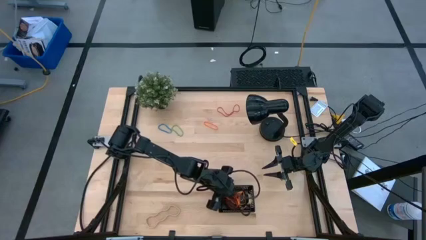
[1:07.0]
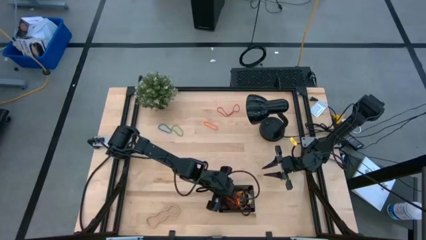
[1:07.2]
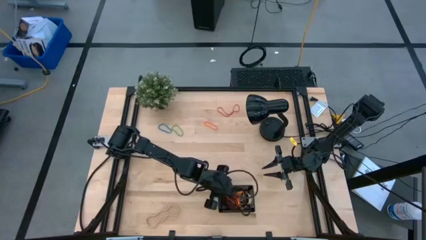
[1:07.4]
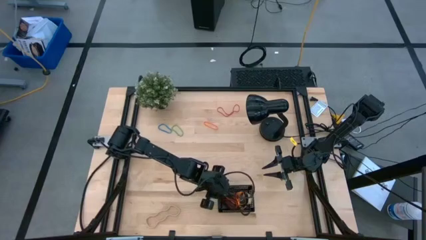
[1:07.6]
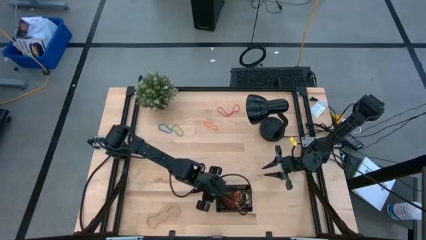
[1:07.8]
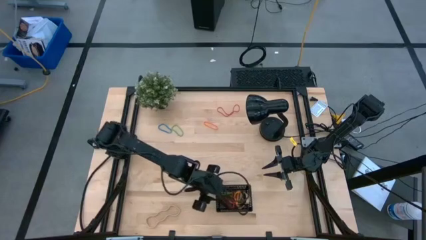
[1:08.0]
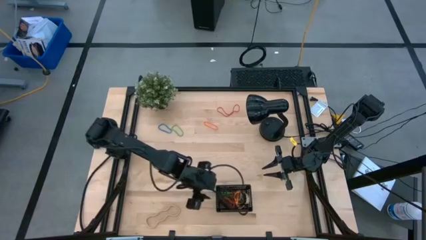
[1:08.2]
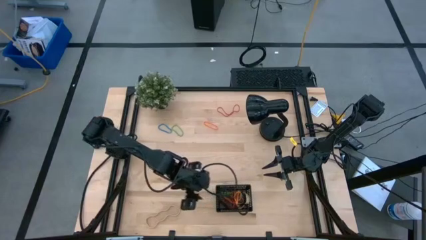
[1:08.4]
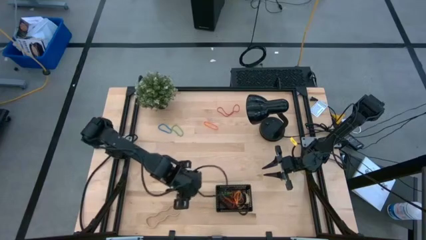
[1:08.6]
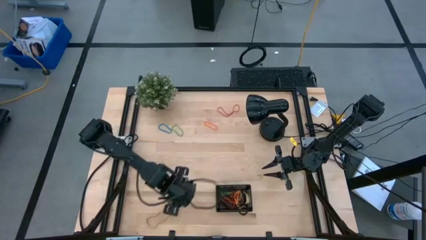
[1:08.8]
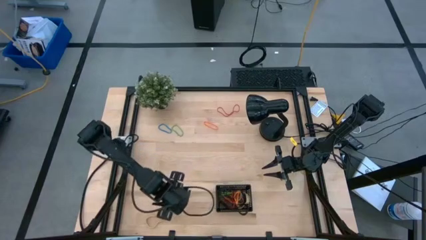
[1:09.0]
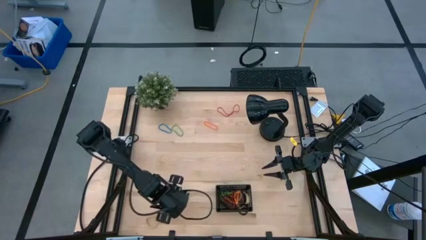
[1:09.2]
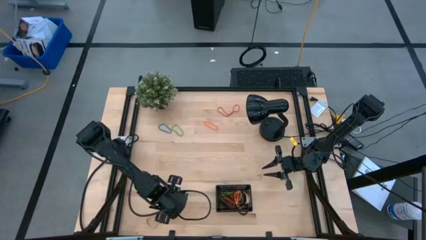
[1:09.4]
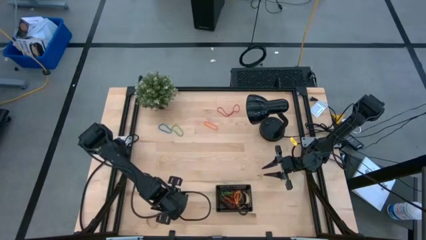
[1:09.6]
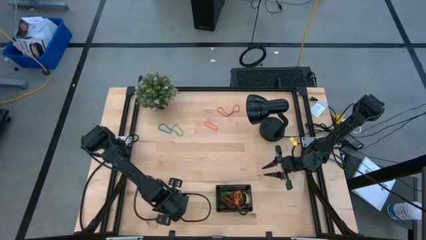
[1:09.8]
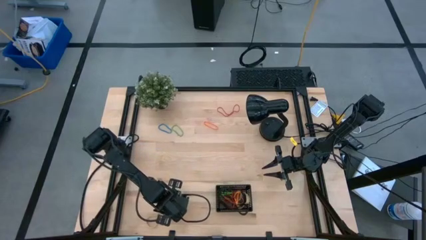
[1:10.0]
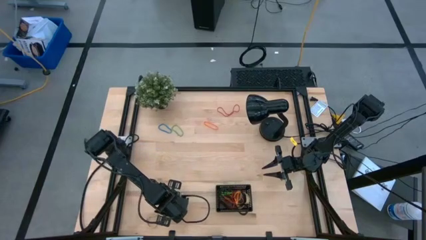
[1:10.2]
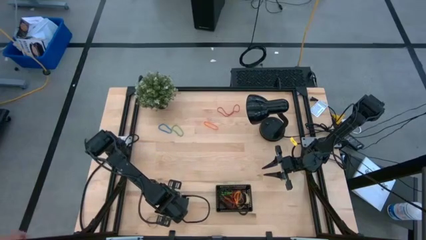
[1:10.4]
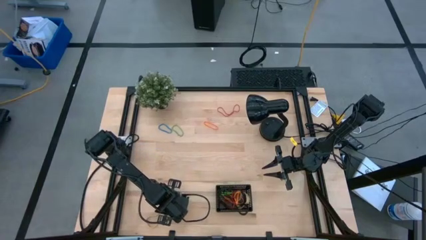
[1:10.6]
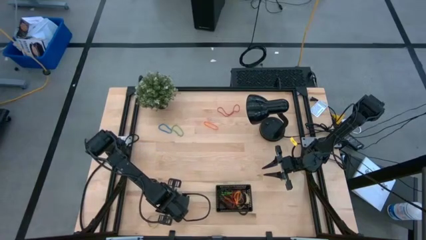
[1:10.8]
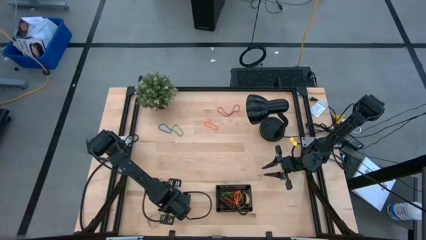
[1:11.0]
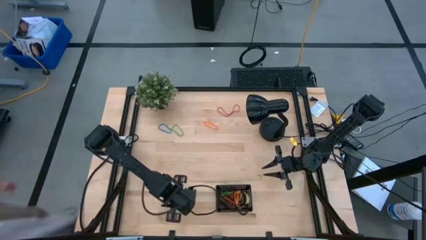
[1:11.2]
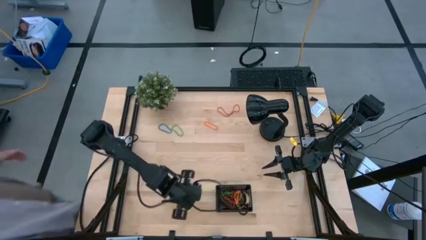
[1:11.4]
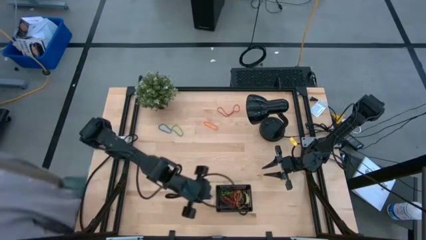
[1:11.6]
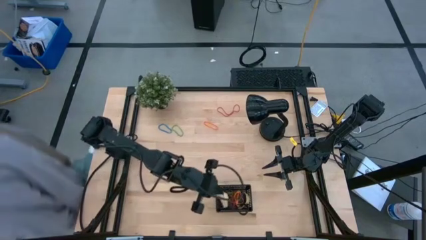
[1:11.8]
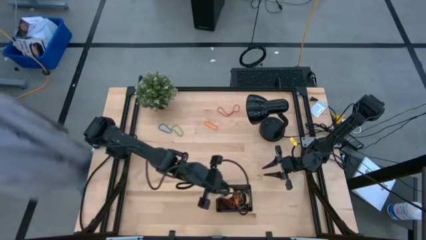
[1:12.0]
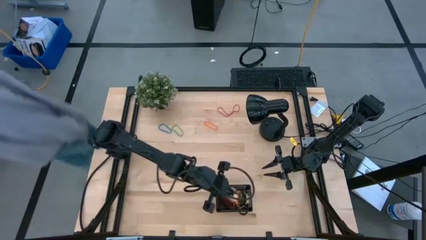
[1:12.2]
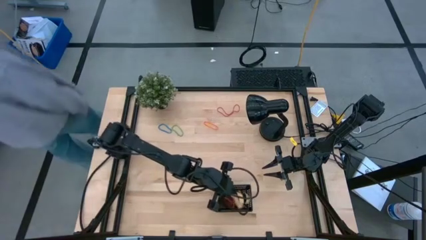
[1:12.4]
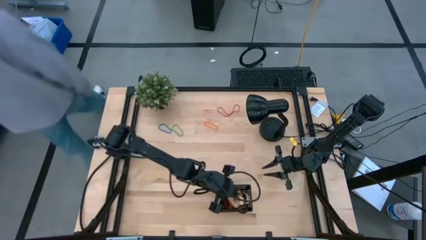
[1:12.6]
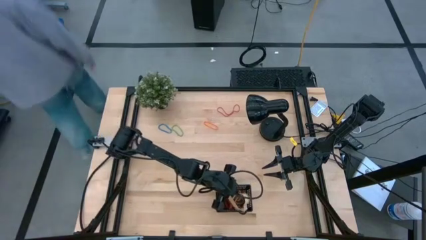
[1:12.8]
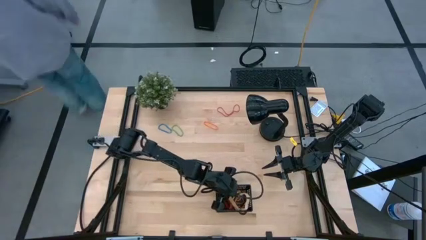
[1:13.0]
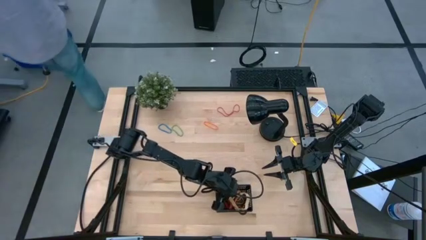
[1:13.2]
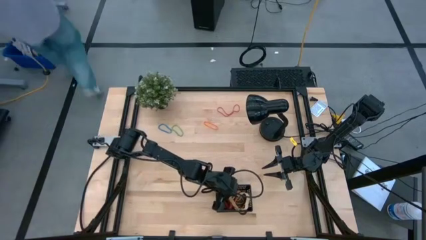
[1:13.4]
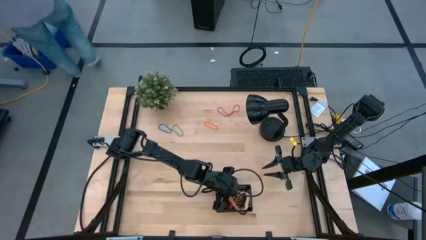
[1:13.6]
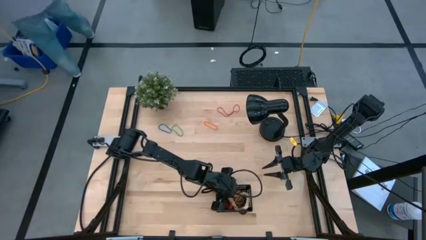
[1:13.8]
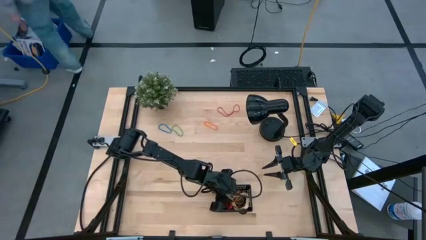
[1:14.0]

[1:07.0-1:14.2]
Task: Pick and place rubber bands into bin
Put the brown rubber band into the black bin

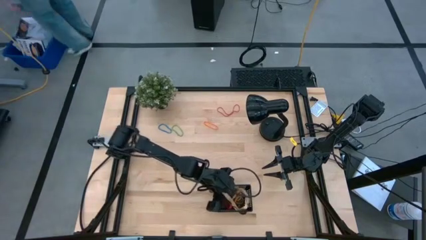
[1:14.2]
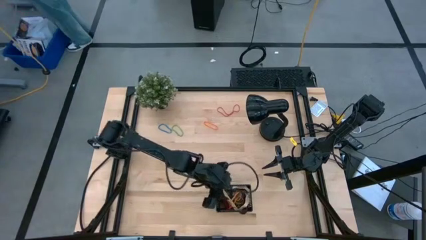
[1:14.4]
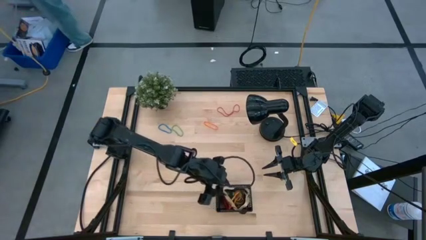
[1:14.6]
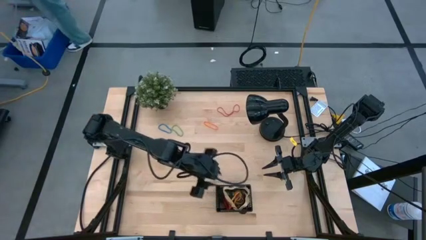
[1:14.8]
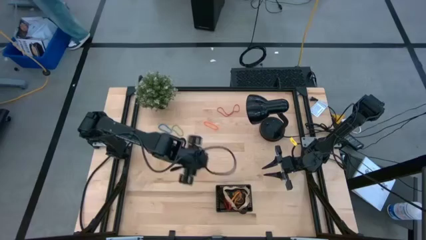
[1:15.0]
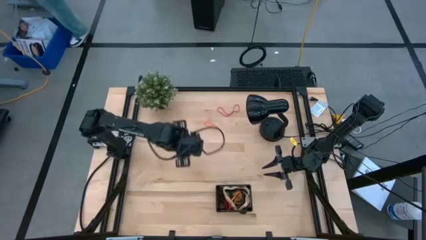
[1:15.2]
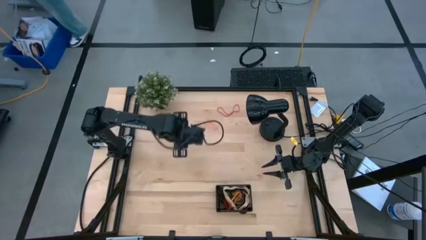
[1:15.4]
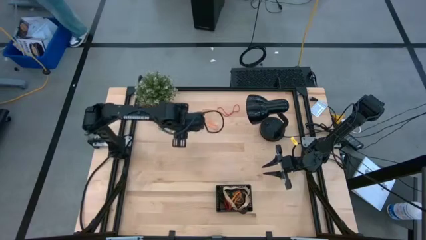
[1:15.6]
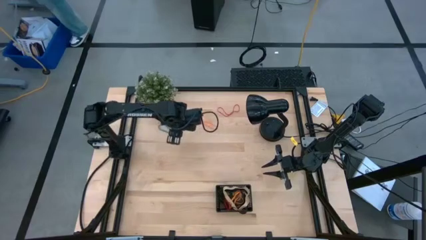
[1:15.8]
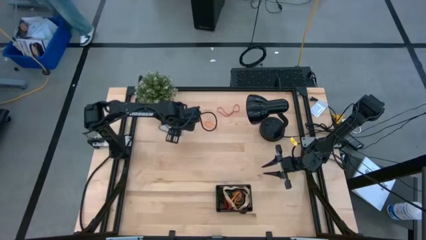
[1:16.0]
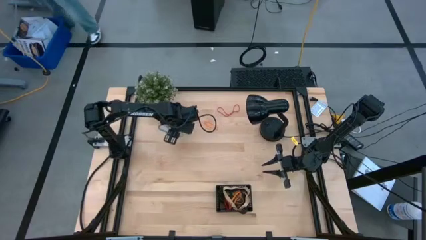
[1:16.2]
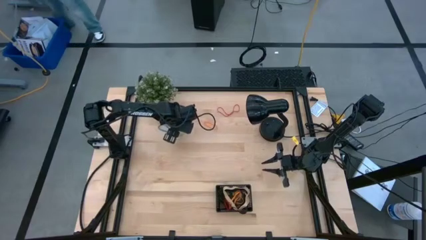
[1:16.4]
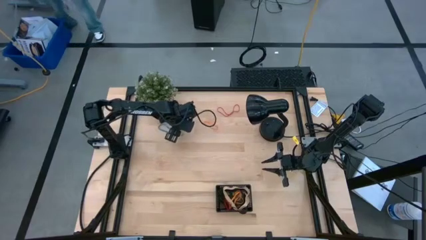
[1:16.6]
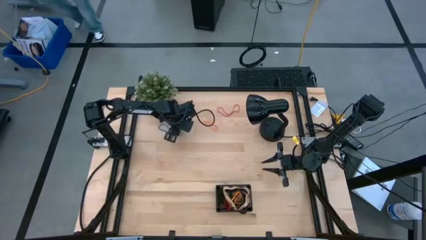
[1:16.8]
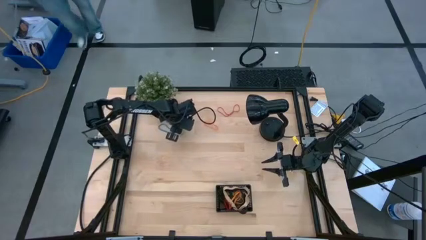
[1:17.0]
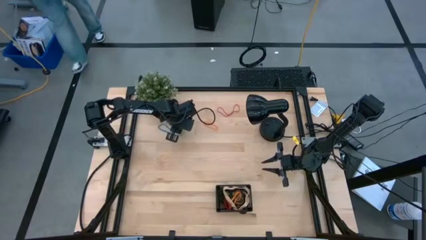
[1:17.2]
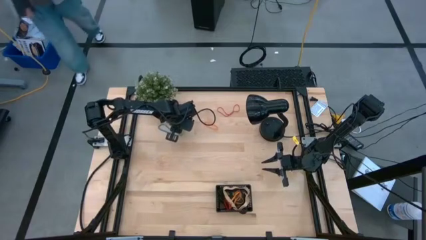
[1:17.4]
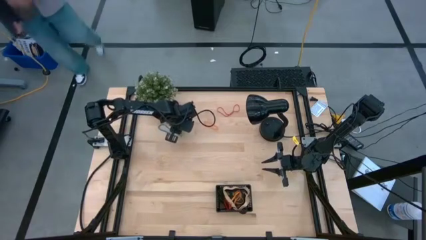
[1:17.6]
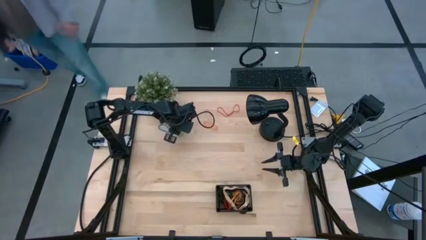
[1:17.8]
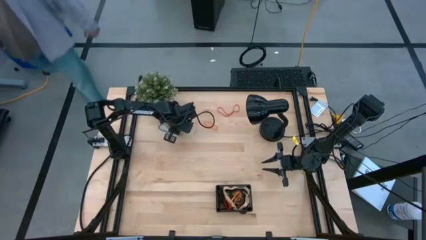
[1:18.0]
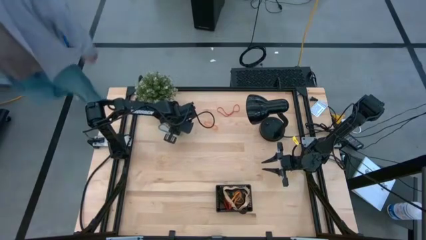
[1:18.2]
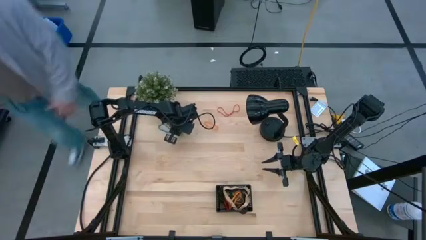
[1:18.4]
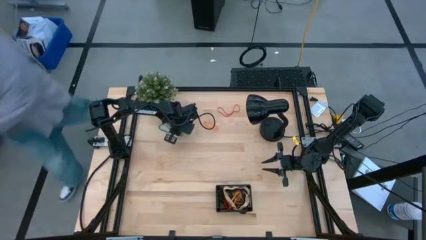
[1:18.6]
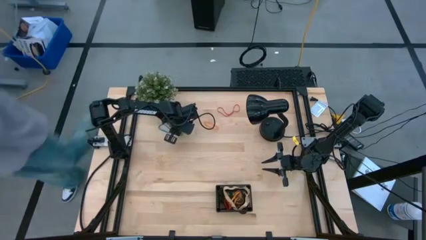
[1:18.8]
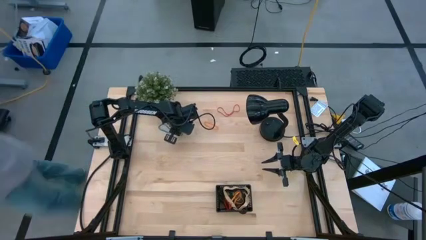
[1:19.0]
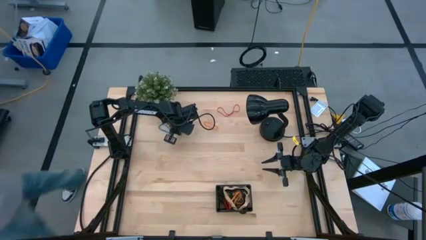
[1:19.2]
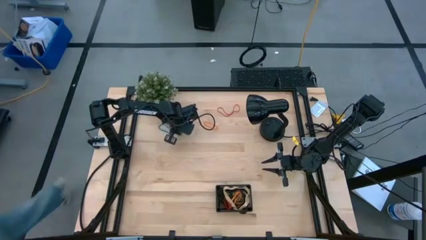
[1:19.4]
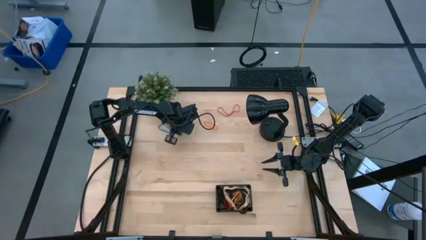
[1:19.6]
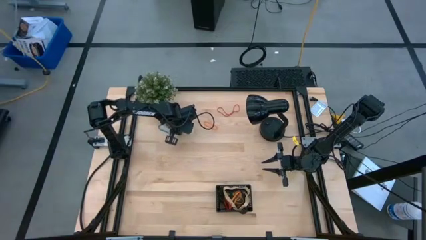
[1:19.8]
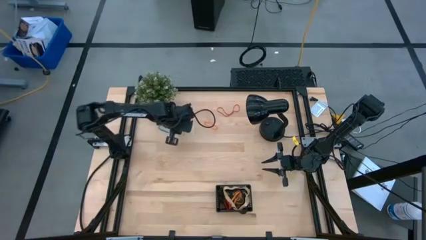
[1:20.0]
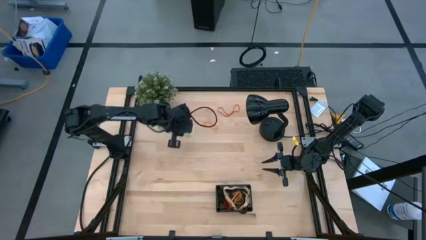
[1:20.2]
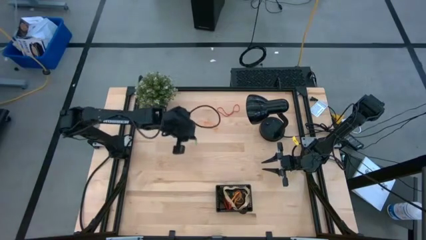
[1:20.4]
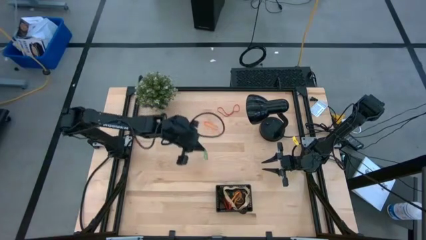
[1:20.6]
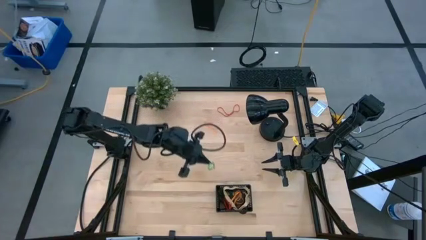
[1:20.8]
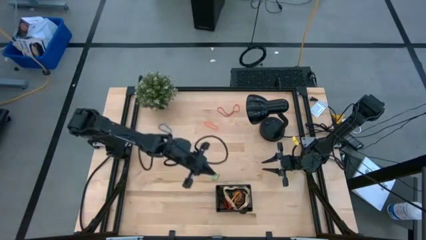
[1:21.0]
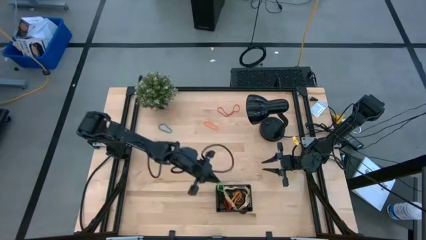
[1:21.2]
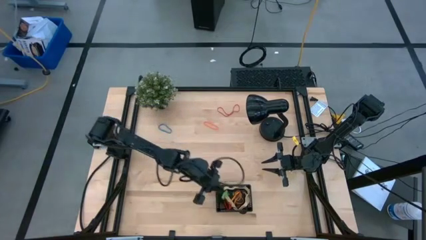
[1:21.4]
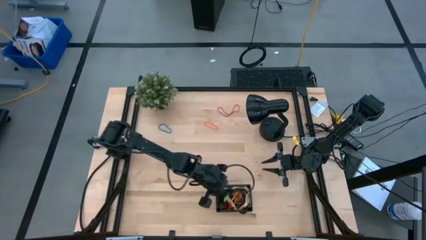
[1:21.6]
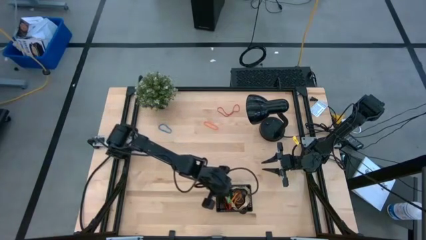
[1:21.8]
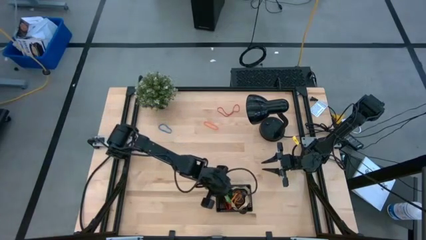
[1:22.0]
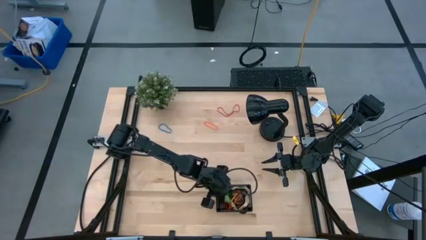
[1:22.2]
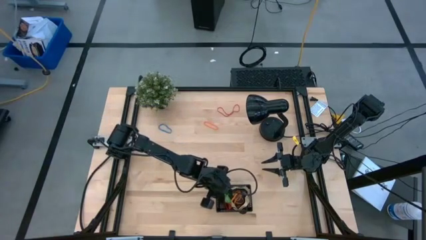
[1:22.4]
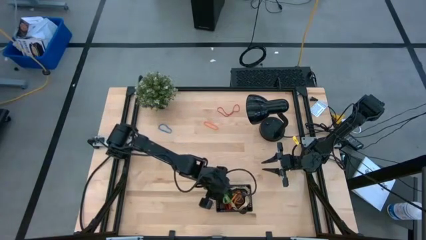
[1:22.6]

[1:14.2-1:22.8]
Put the green rubber band into the black bin
